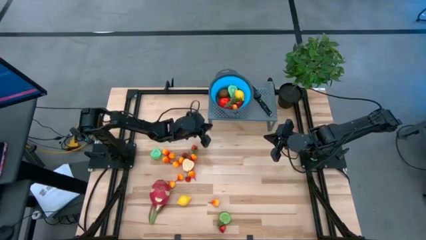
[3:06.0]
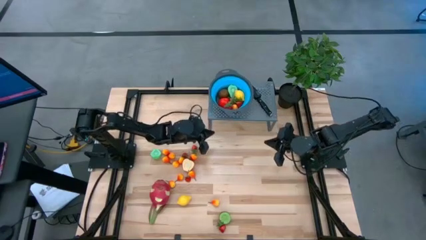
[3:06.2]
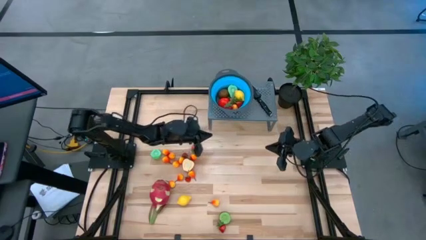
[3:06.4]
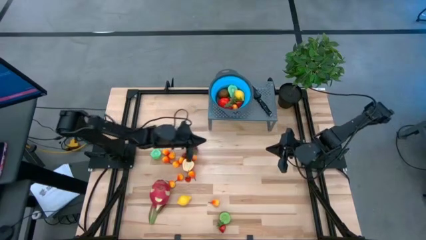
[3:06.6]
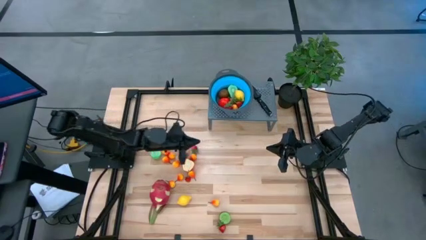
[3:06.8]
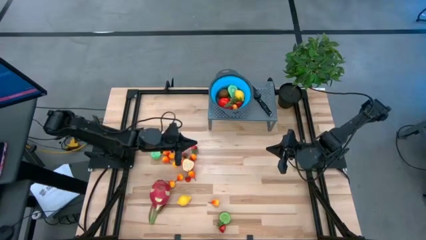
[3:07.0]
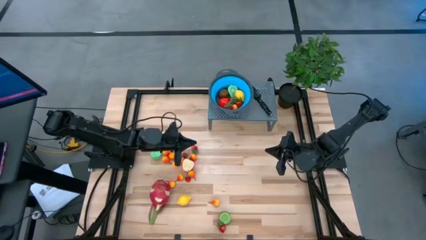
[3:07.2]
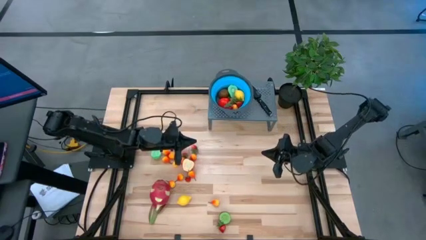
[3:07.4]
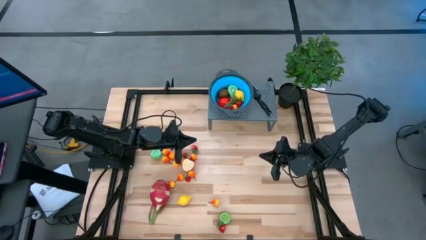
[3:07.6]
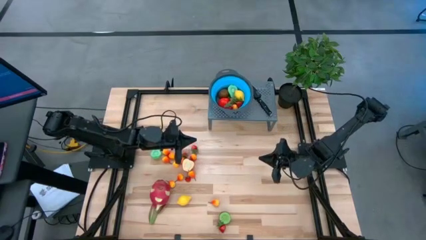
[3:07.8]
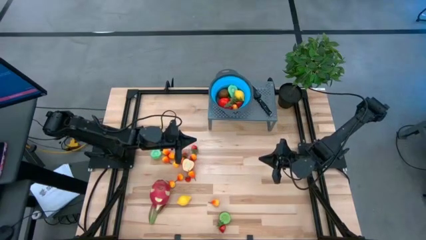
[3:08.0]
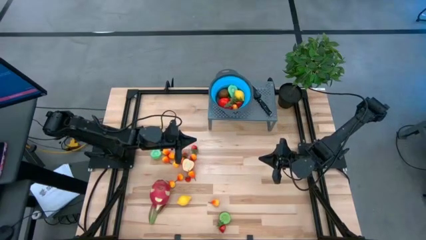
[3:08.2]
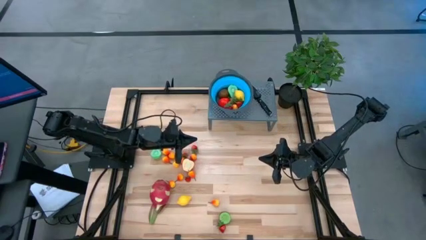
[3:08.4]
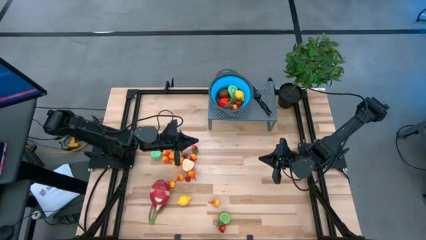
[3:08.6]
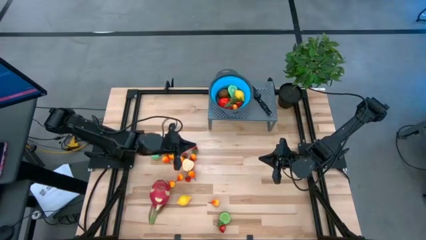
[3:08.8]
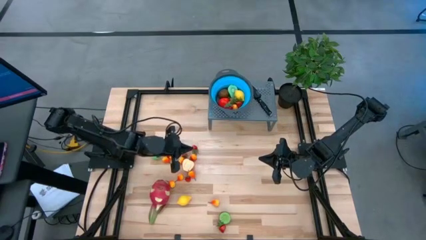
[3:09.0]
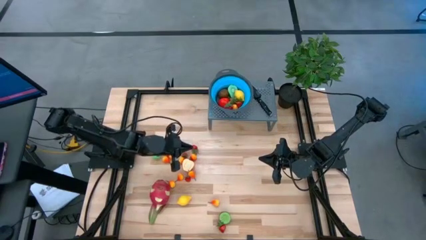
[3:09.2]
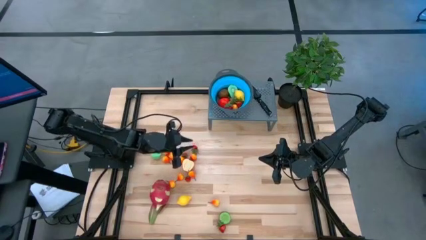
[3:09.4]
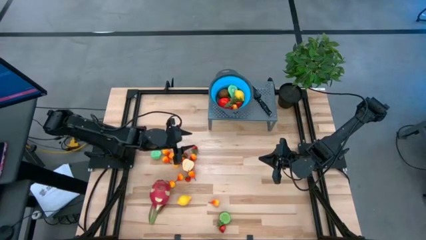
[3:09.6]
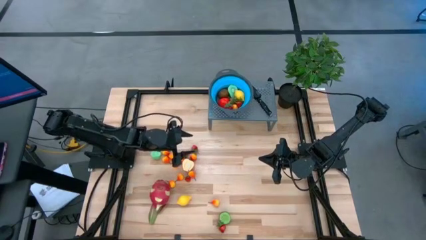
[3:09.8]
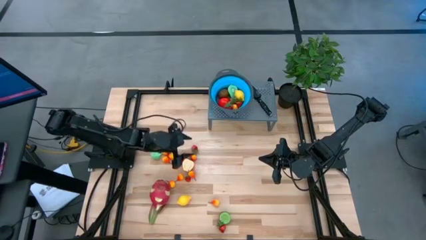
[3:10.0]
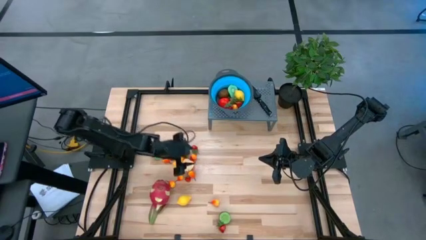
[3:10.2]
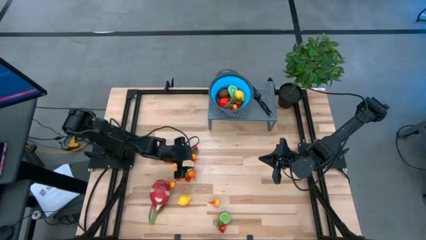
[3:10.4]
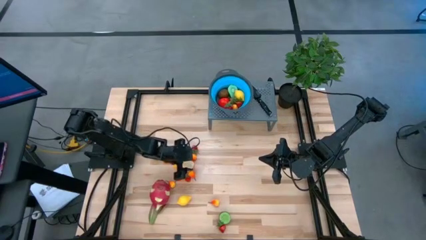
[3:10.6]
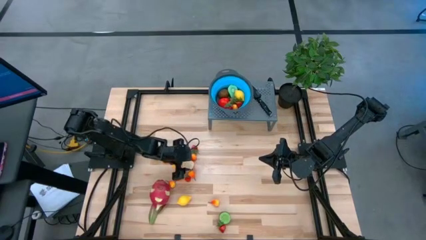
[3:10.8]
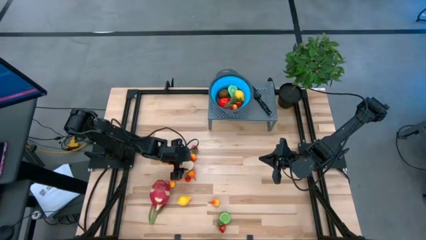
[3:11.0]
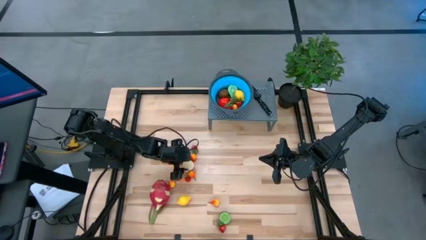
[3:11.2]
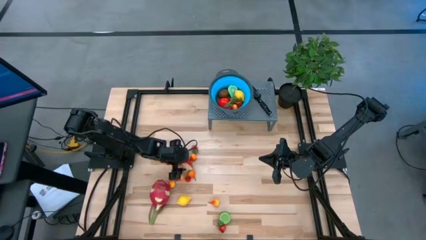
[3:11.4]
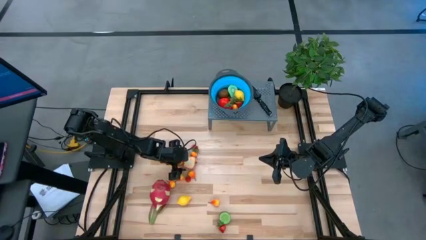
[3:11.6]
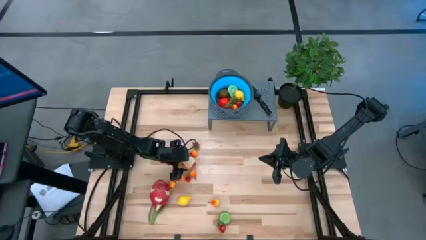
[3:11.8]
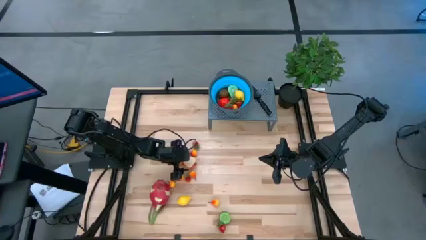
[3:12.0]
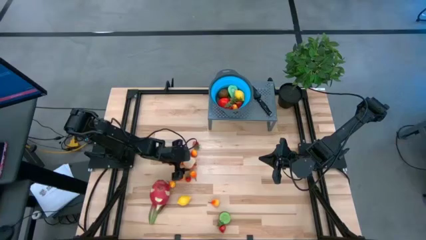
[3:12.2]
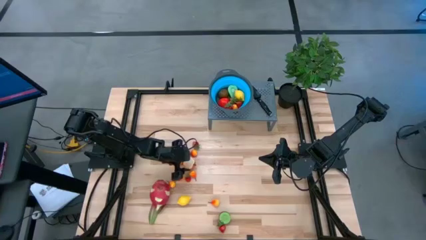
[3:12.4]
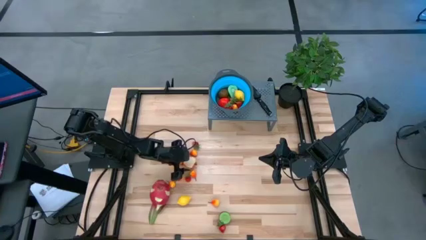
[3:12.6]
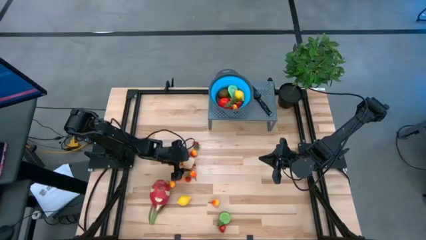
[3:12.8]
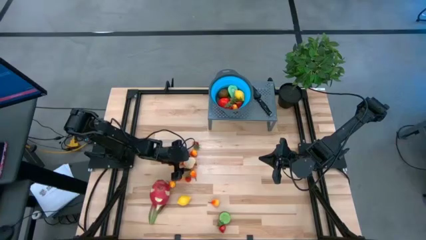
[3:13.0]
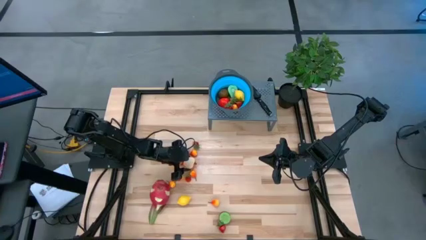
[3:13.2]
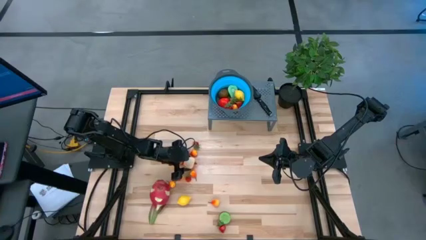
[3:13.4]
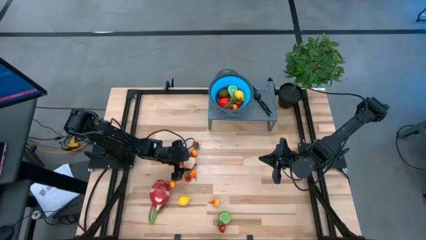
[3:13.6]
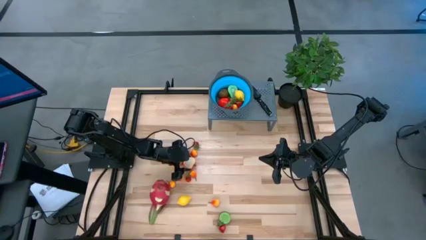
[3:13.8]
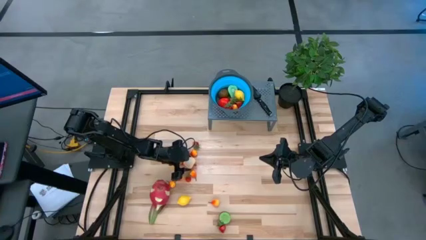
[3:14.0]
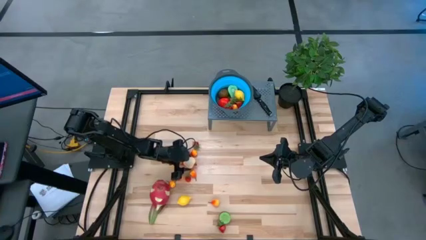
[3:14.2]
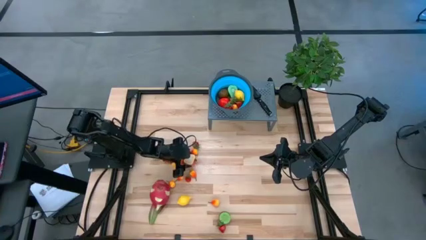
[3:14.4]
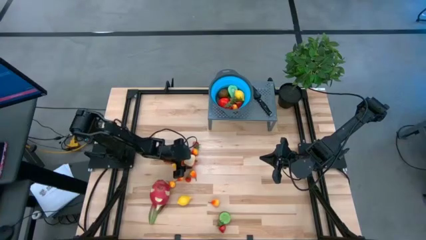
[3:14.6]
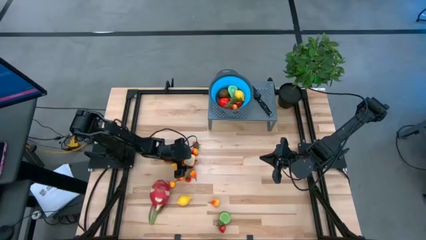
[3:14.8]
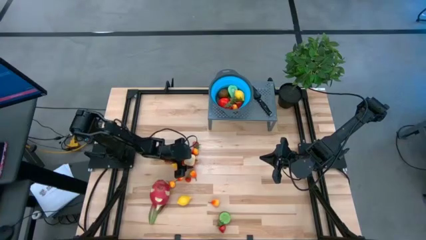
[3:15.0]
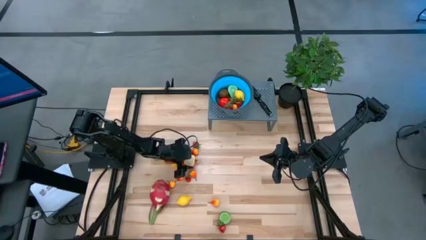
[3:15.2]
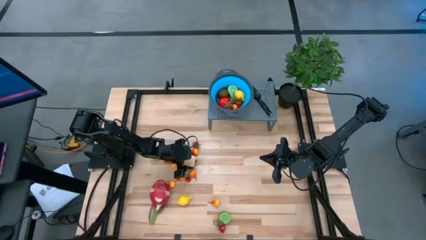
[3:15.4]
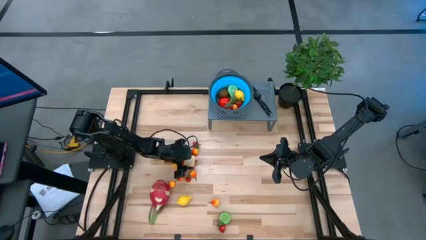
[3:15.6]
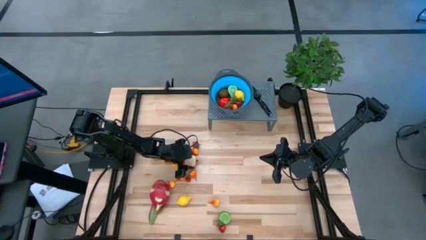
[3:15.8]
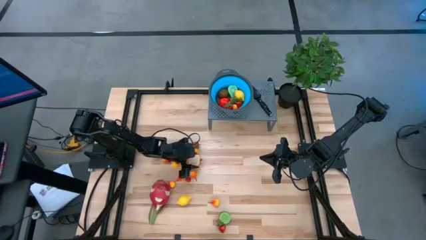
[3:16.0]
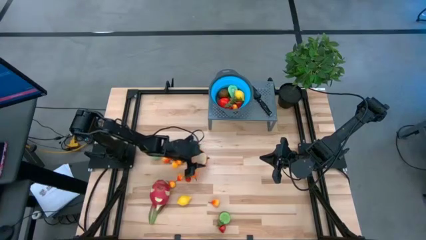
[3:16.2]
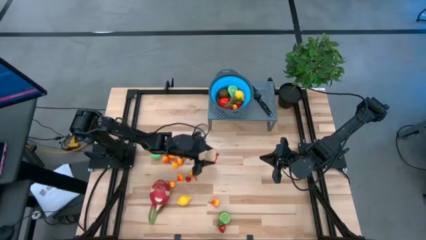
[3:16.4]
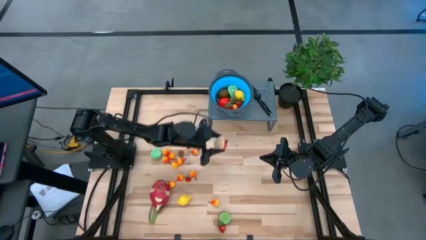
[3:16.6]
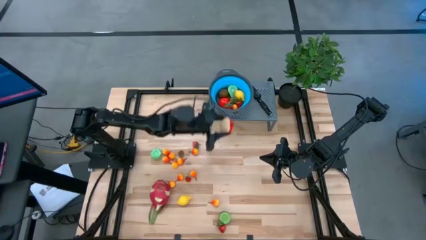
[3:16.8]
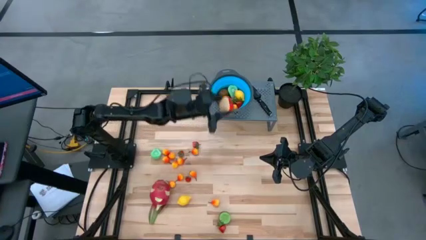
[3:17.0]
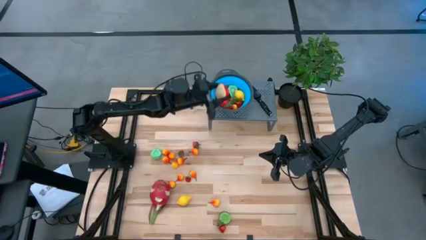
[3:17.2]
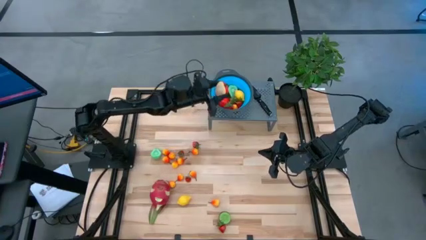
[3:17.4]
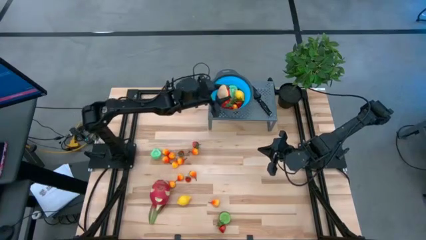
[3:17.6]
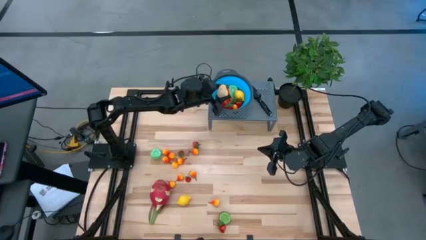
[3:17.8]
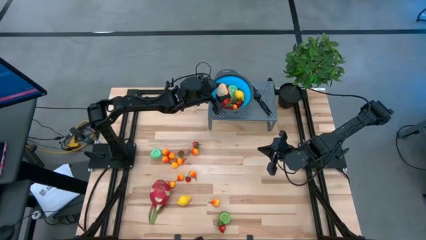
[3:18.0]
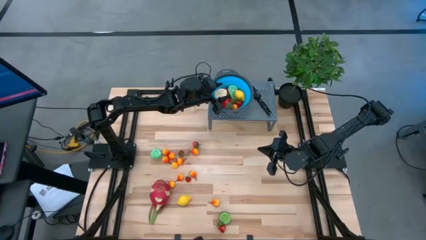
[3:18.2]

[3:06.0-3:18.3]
Task: Pick & Place Fruit
Put the apple into the strainer bowl

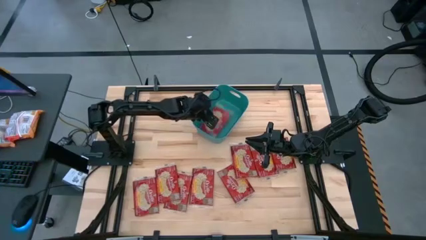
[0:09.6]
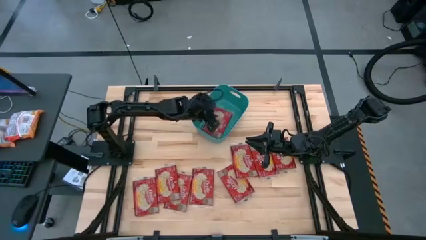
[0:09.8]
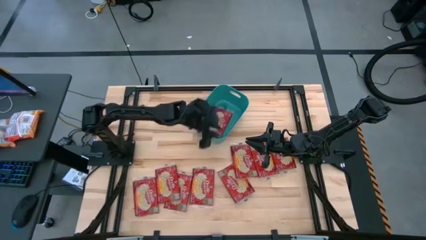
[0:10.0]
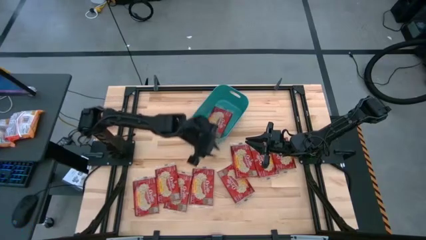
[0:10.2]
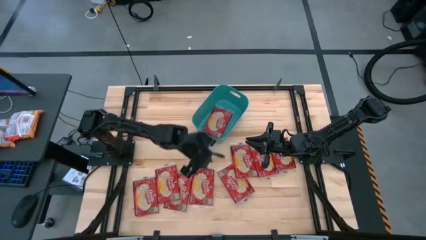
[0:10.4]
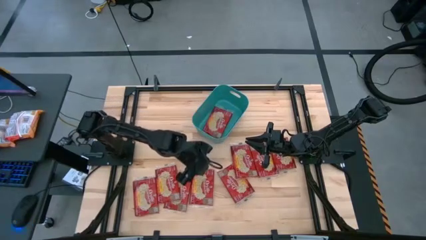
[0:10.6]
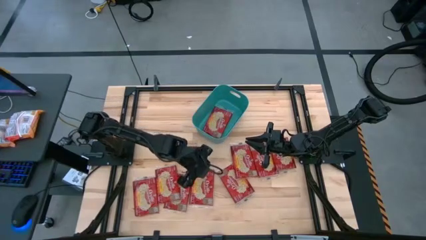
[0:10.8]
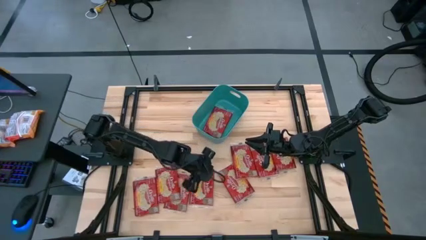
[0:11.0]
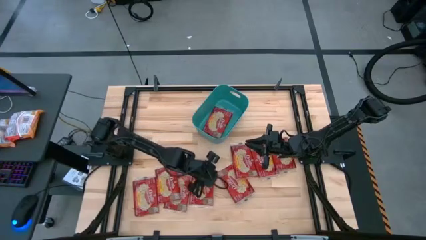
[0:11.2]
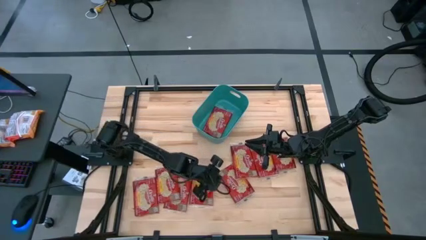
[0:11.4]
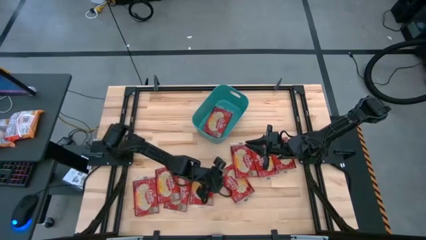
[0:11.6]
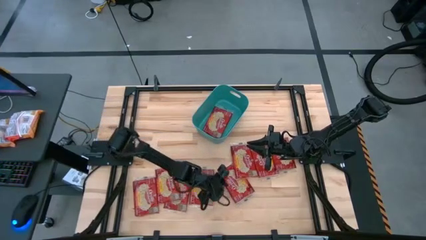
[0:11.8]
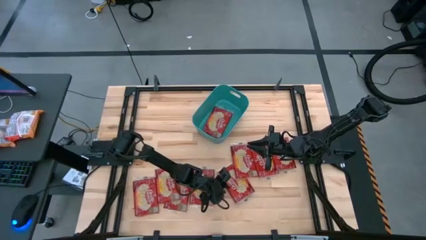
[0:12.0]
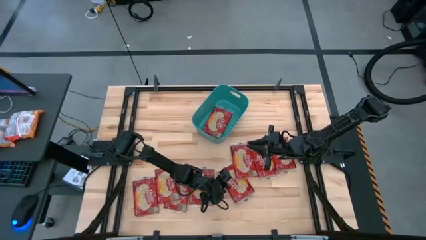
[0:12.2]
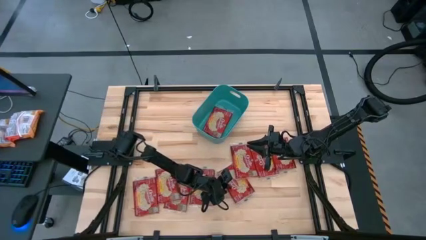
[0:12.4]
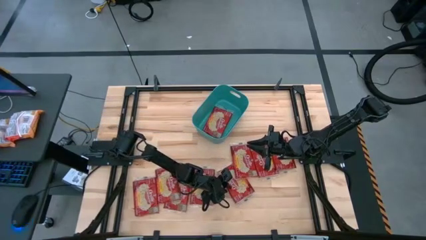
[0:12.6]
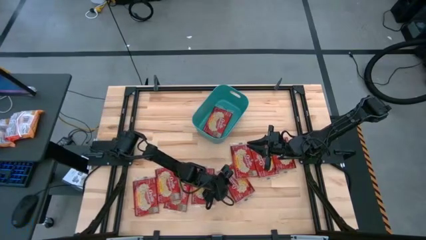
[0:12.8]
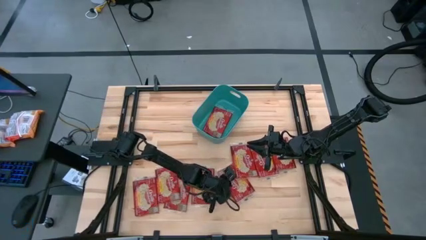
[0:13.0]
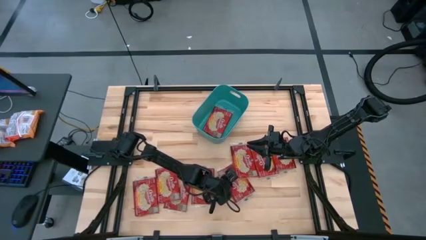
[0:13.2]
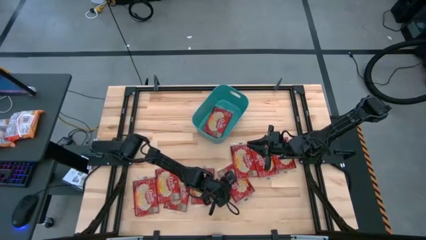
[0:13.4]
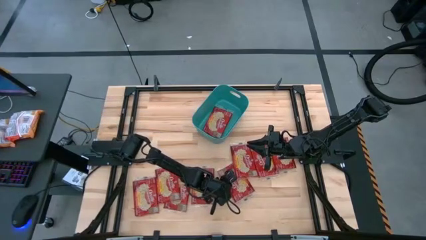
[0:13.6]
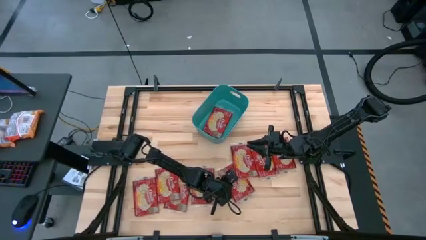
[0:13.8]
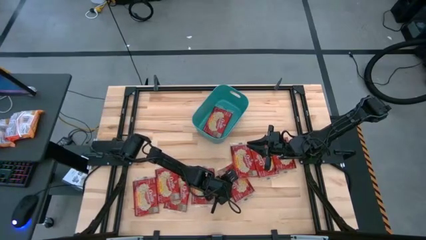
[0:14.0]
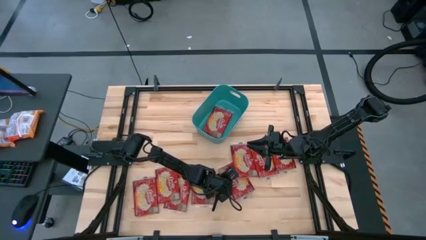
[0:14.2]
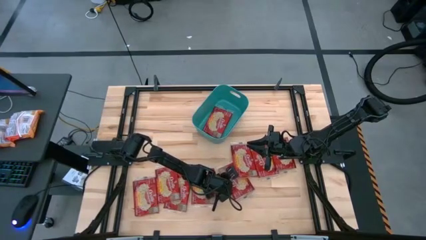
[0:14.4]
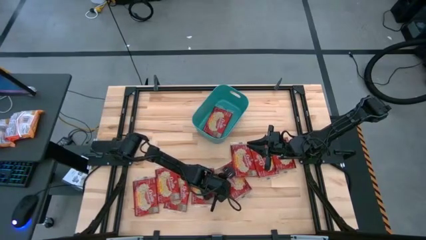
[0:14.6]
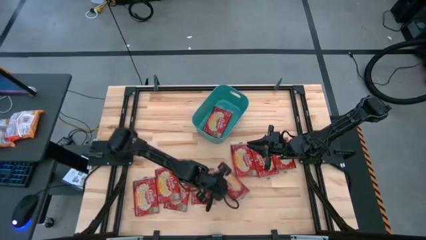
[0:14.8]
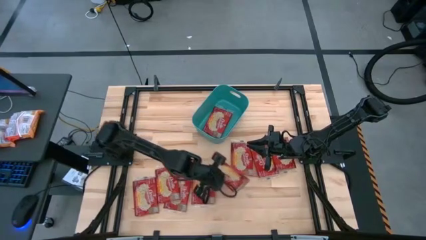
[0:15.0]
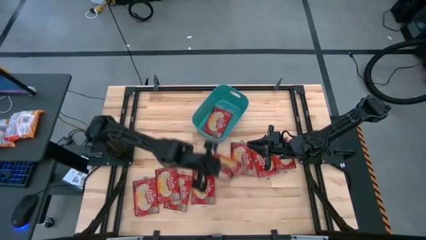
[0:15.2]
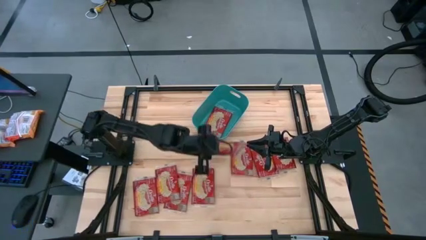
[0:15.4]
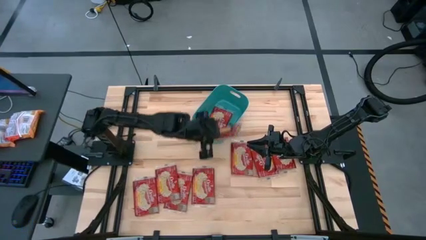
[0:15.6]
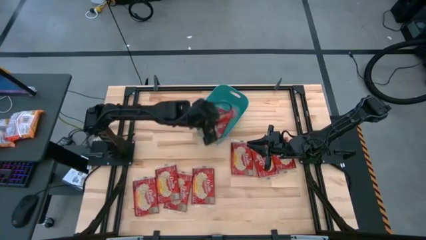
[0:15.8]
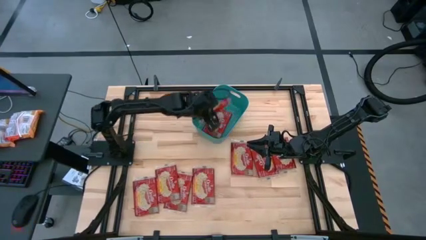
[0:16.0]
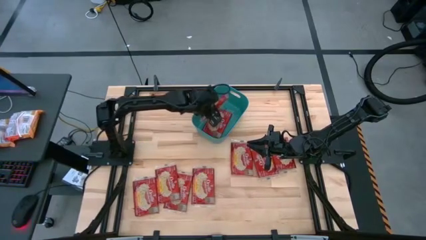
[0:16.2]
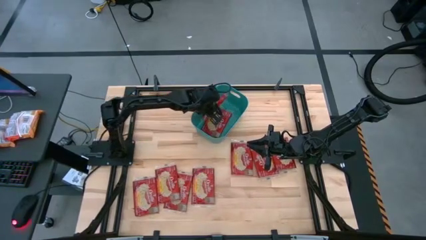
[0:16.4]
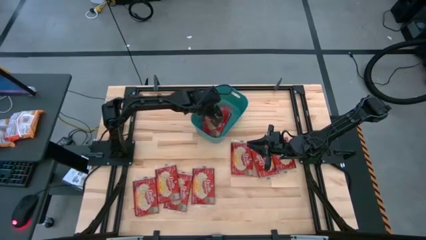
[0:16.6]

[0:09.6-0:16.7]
Task: Sort popcorn bags into baskets
Put the popcorn pack into the blue bin
